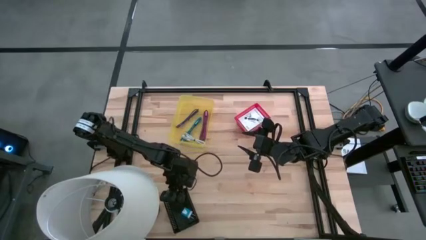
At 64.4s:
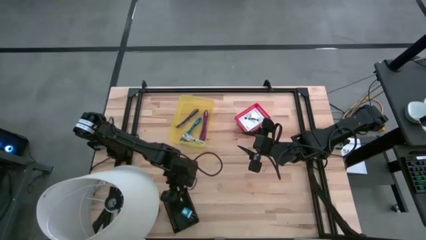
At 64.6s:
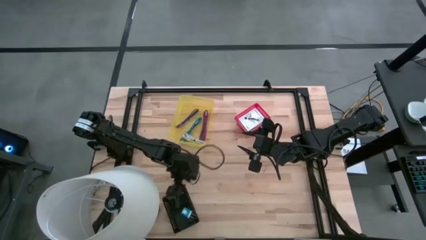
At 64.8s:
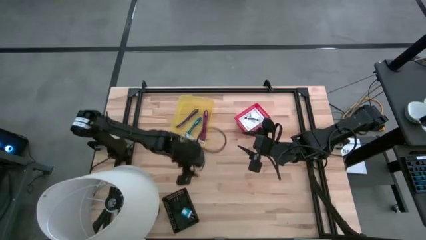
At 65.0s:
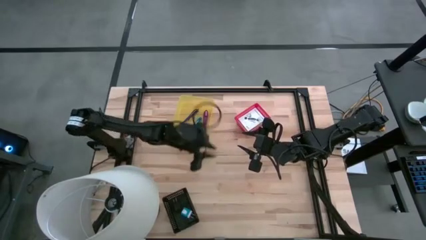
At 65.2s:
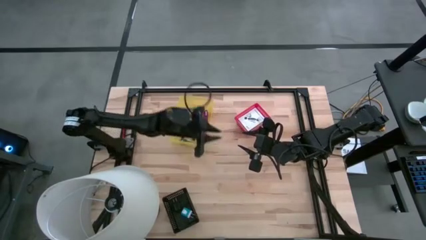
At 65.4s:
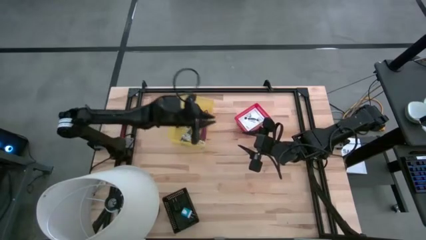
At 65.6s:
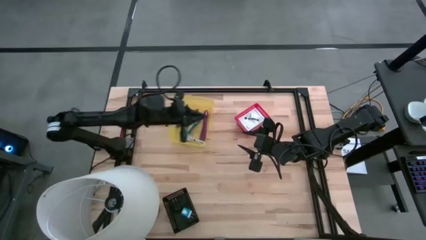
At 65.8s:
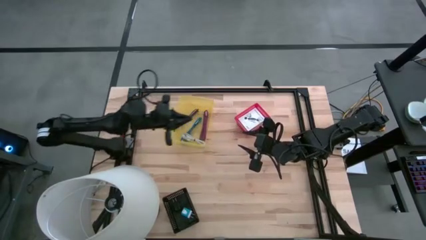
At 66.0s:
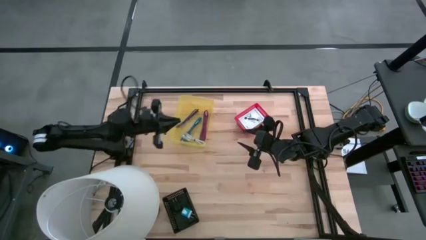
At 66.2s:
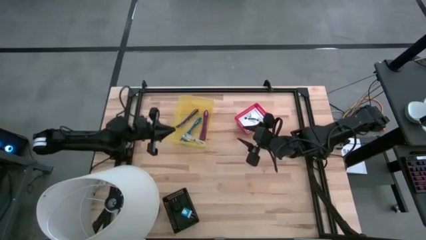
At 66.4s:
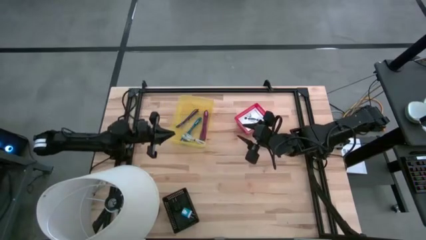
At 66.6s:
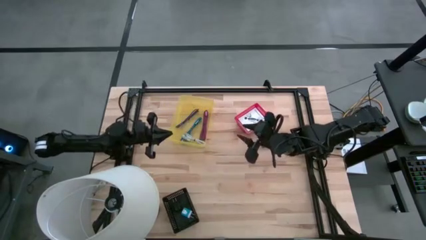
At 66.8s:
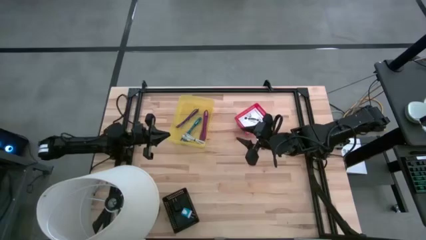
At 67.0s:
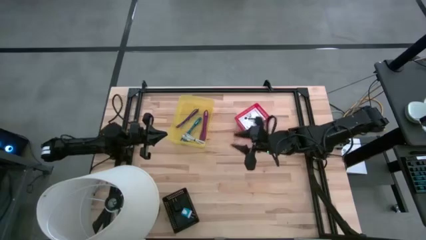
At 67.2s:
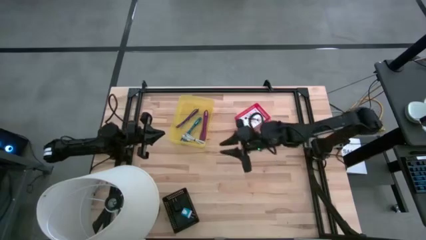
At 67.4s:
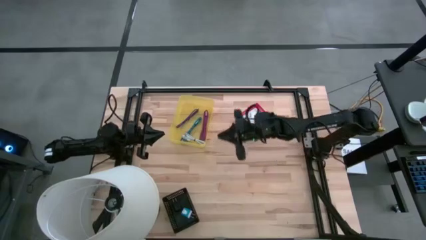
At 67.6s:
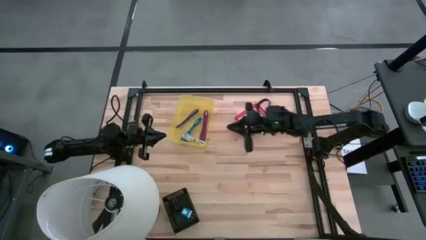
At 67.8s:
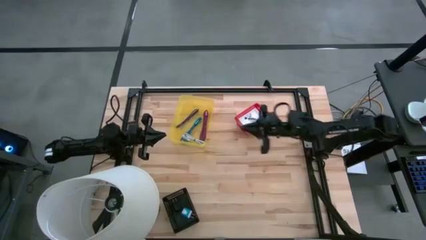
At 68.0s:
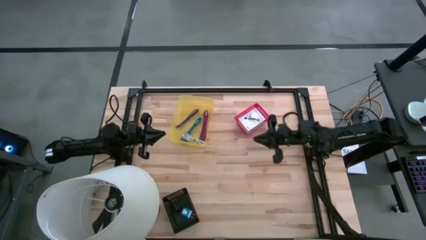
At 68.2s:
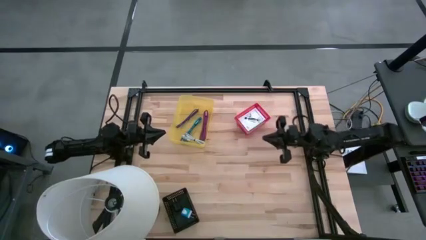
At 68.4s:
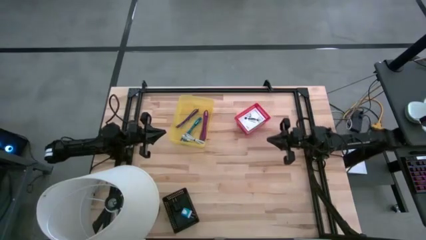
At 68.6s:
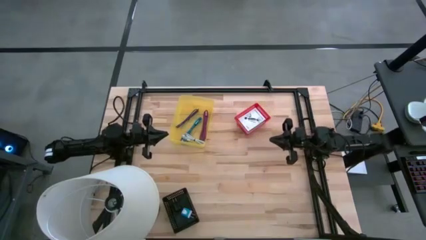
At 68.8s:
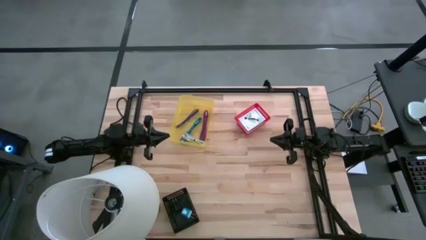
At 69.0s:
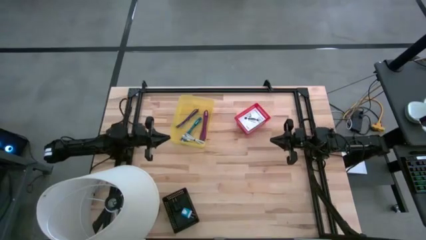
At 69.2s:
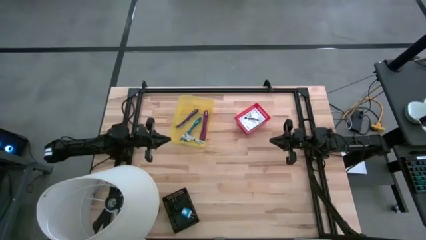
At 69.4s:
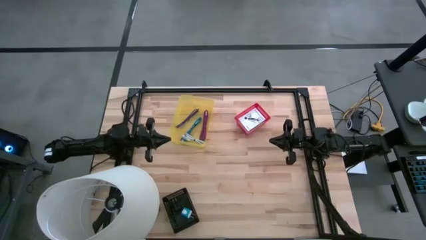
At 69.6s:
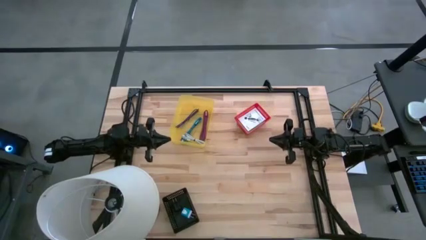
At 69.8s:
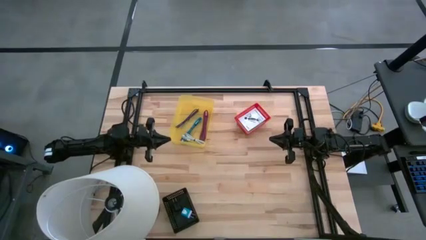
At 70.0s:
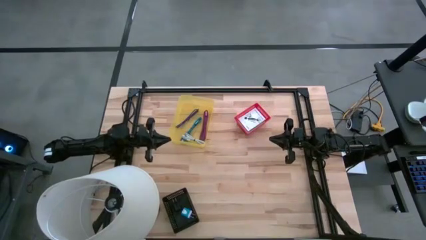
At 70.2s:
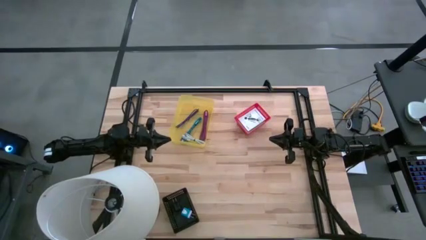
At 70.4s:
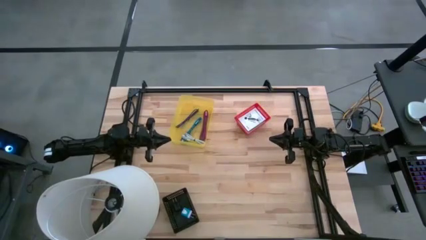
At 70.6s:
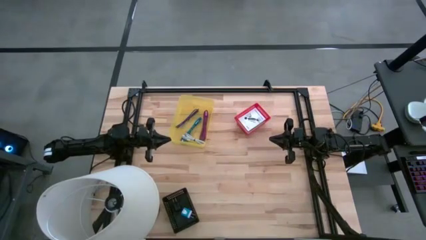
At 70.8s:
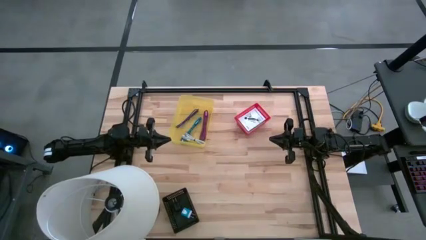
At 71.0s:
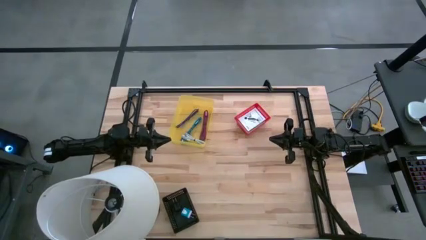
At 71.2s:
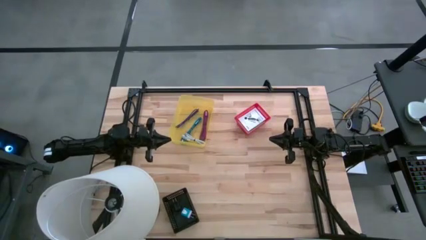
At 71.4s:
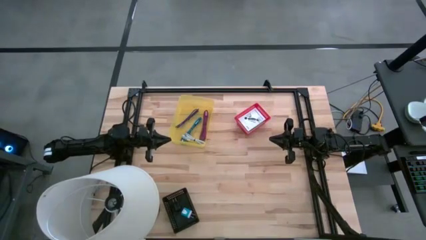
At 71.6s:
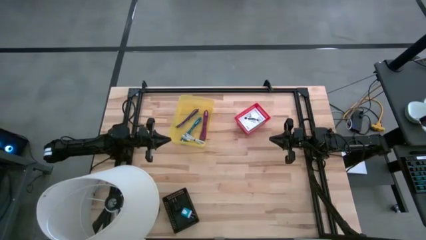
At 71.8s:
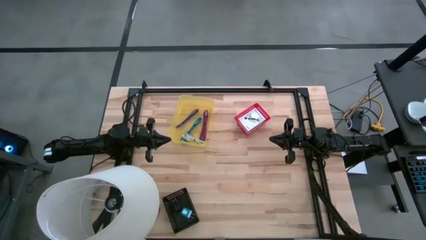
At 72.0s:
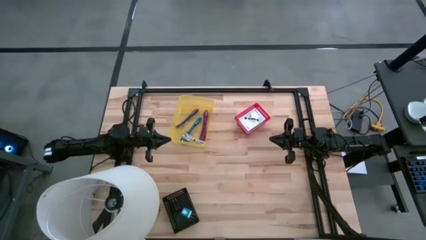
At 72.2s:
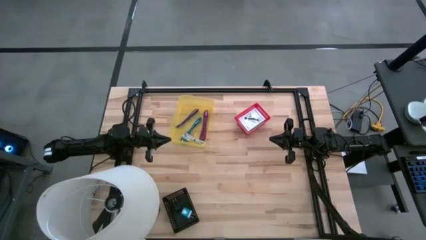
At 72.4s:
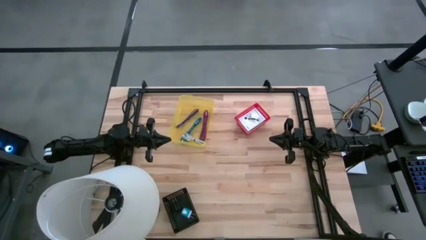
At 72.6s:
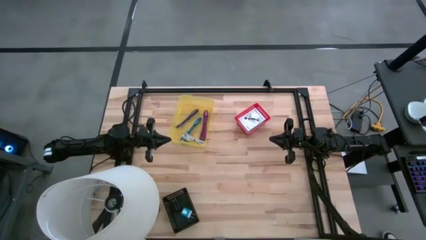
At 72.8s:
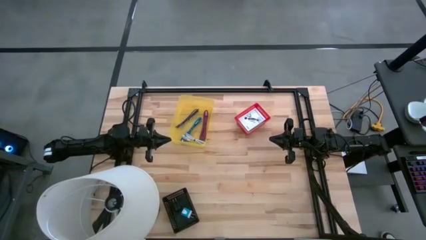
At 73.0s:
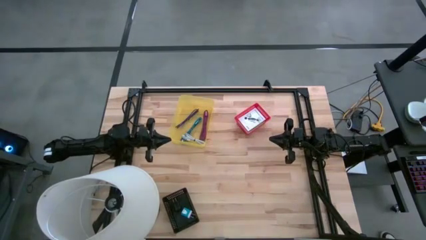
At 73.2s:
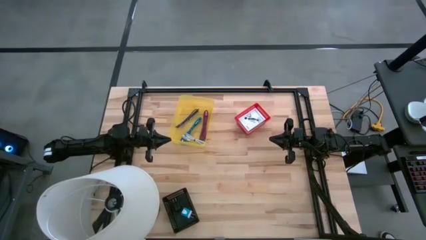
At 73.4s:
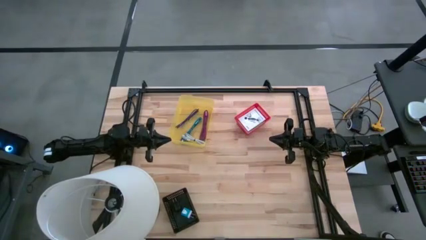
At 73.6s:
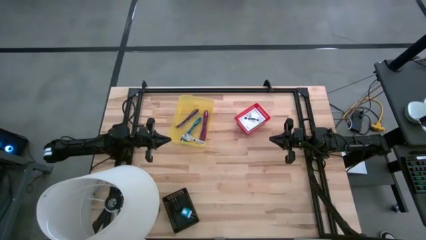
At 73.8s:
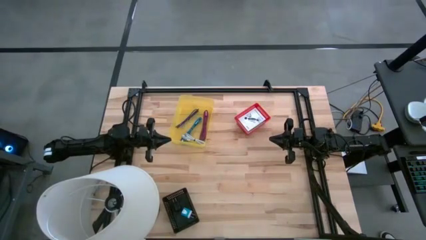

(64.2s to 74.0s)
Task: Pick and place items into bin
Return to Home Position

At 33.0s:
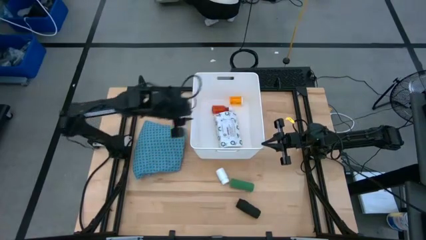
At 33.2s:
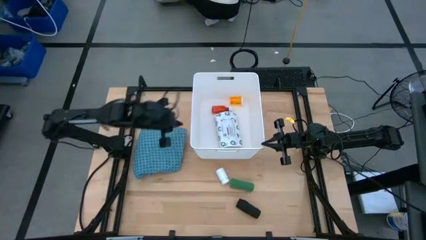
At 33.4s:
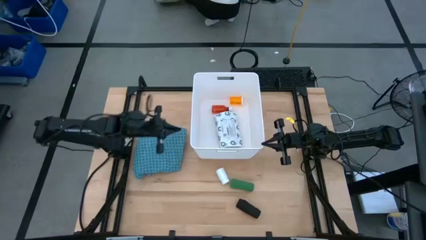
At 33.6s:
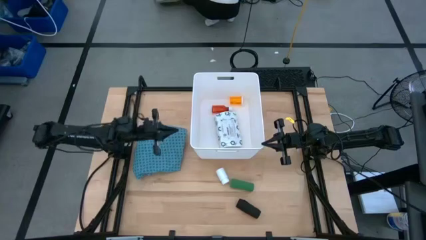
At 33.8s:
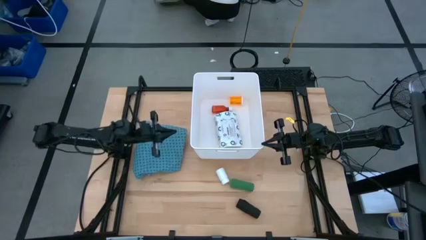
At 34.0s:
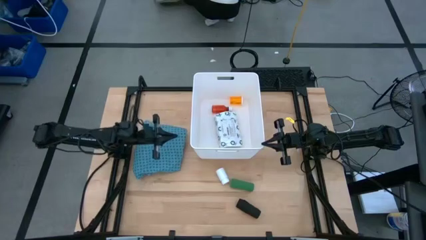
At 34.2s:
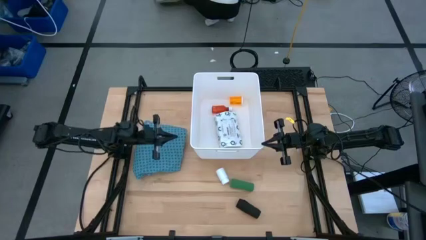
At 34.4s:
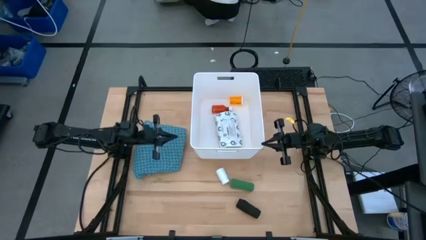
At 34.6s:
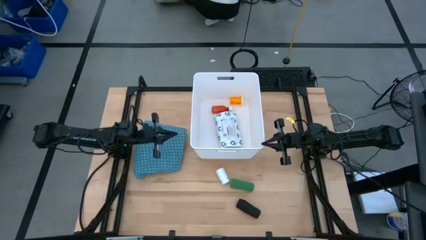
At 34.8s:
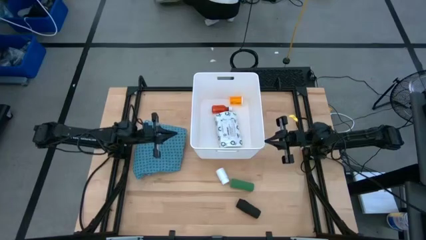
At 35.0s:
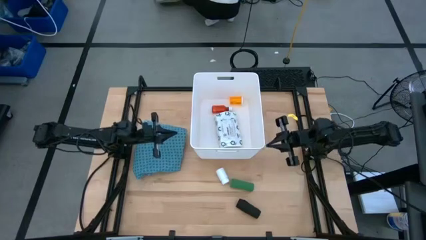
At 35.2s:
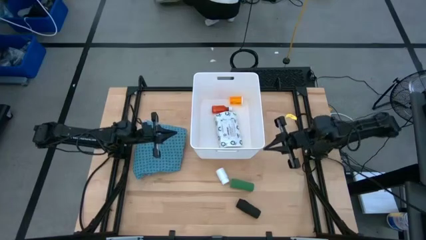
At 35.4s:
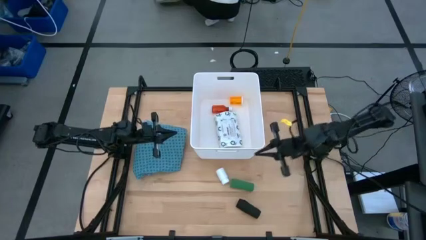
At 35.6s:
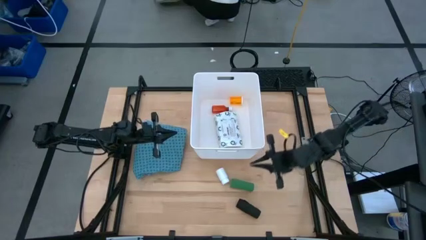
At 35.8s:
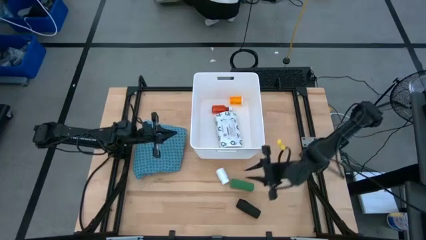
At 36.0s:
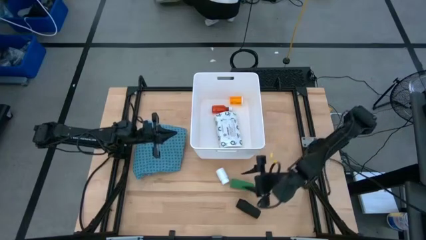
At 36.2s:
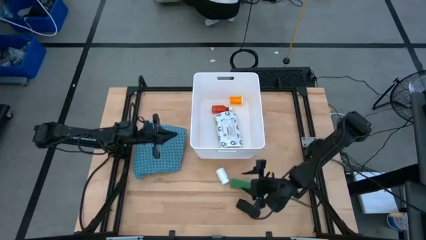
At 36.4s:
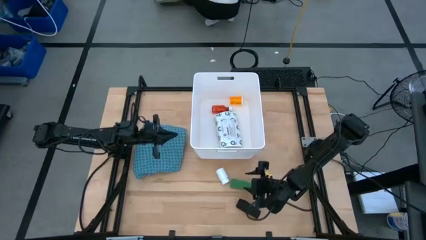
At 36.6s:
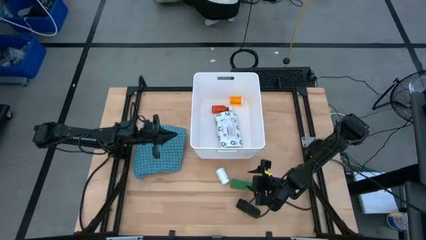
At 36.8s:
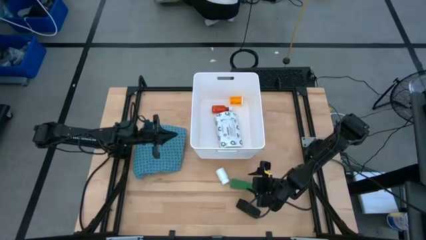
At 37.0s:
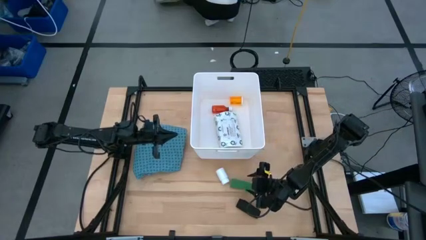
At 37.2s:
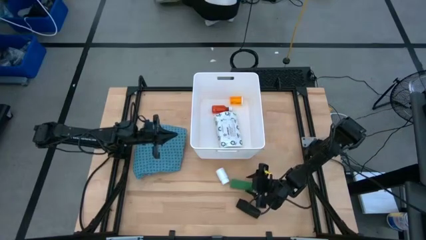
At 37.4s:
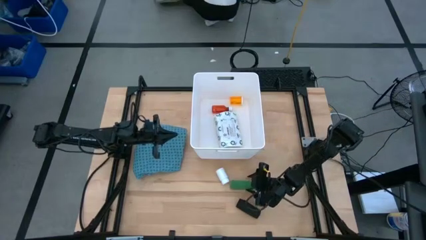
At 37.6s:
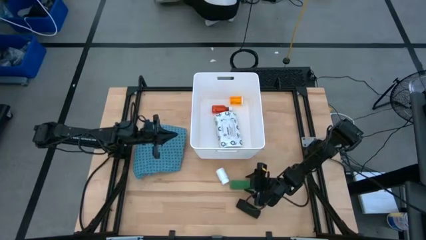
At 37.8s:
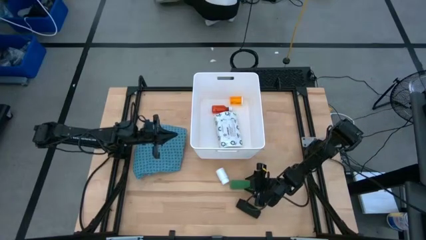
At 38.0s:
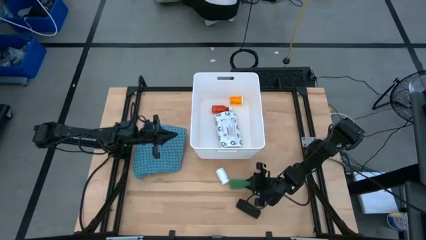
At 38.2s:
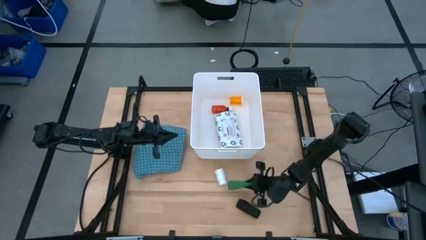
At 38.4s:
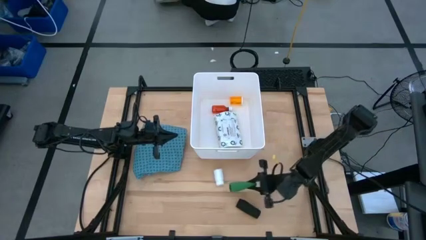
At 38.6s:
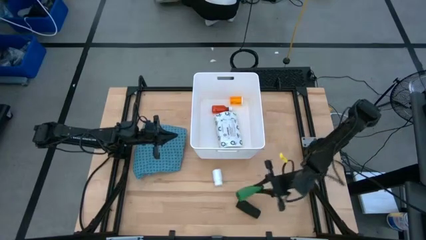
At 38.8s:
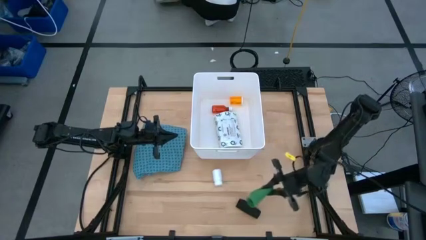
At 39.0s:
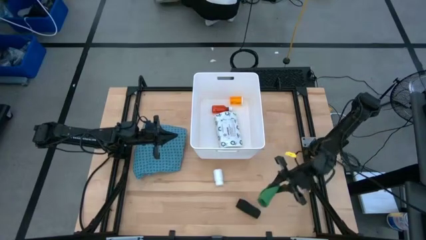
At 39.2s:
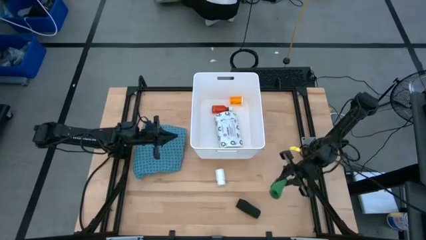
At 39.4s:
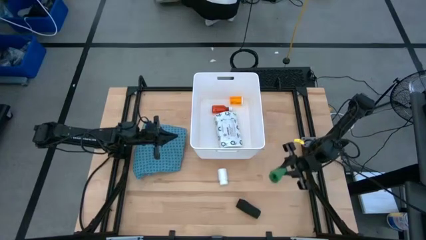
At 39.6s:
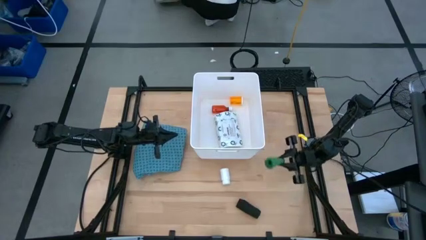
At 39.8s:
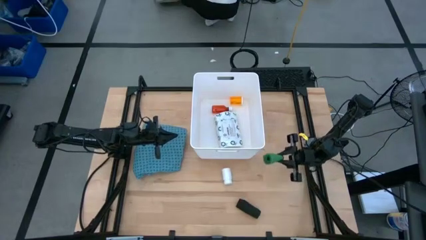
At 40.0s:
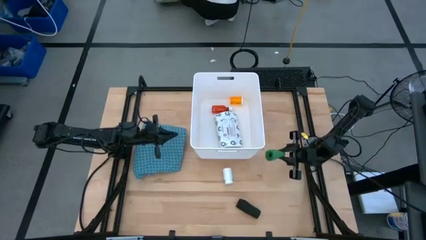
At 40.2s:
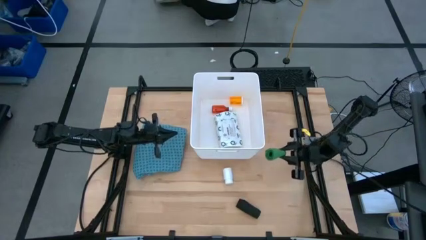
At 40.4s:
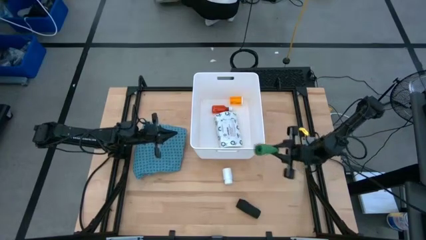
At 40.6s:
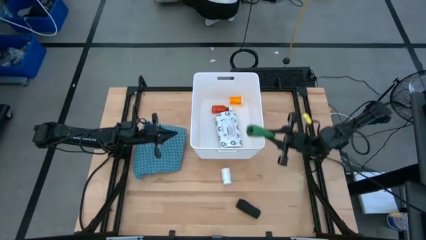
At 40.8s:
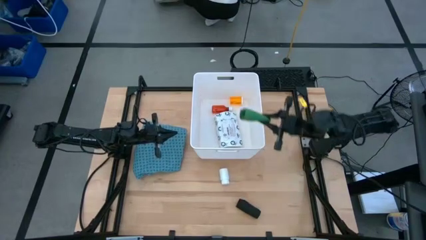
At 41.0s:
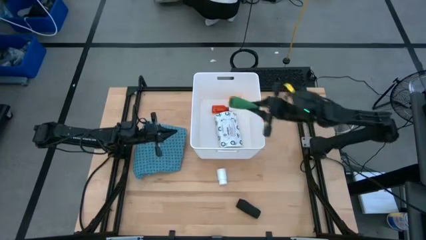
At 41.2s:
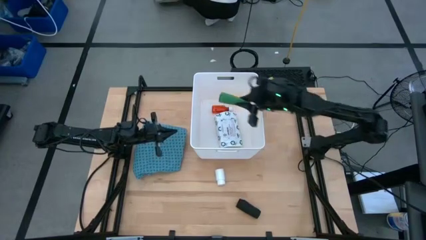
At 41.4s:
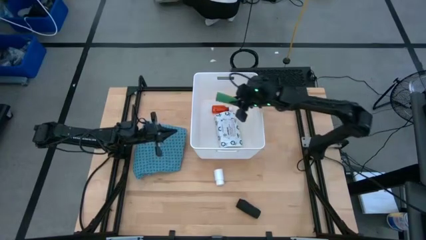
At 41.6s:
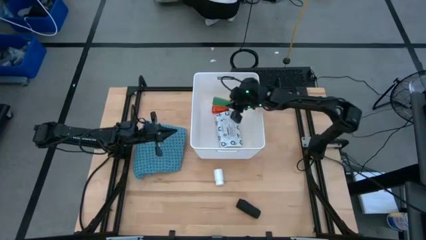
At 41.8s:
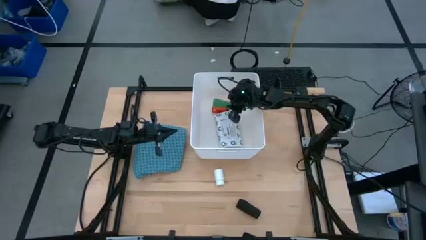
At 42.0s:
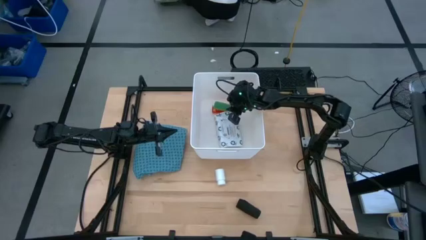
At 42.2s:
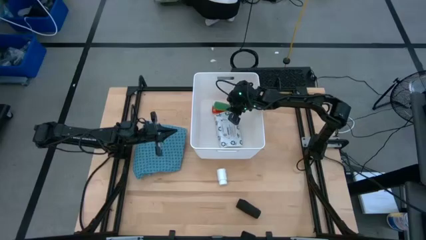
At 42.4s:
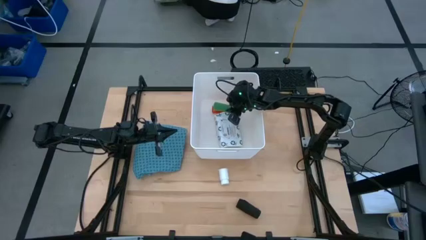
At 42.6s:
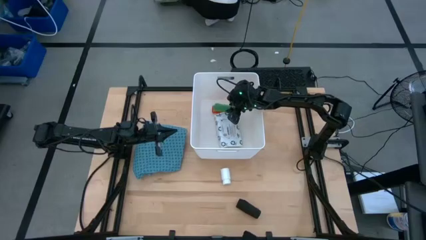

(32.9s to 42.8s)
Task: Pick & place medical supplies in basket/bin
Put the green bandage into the white bin
